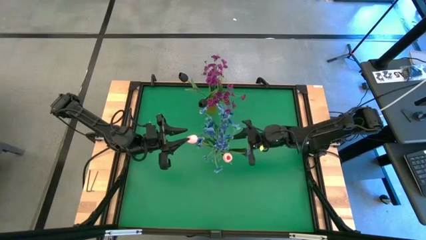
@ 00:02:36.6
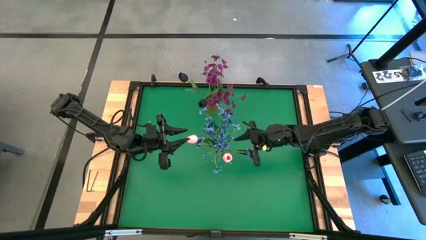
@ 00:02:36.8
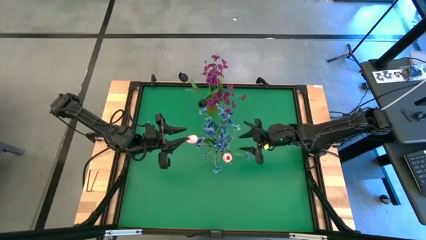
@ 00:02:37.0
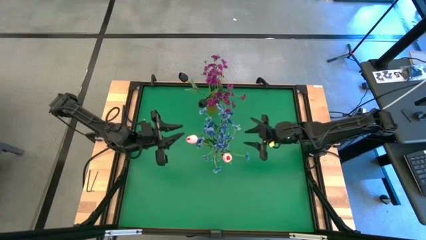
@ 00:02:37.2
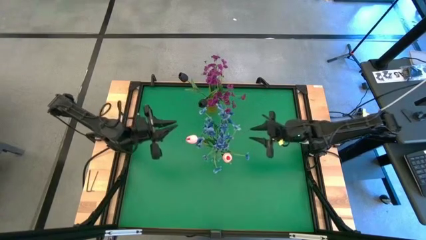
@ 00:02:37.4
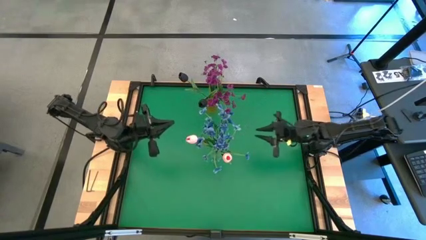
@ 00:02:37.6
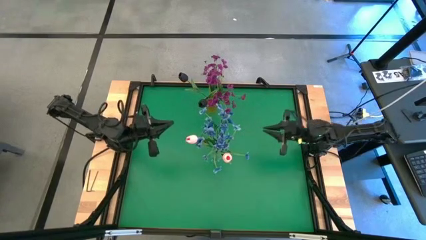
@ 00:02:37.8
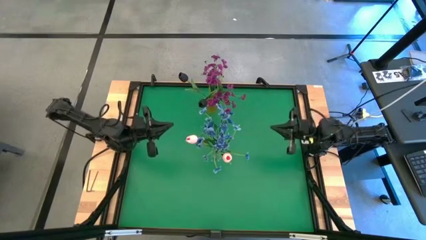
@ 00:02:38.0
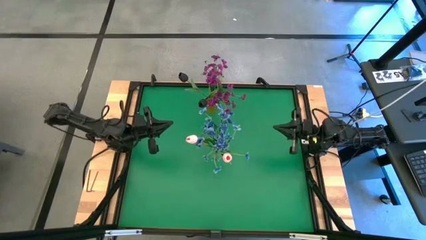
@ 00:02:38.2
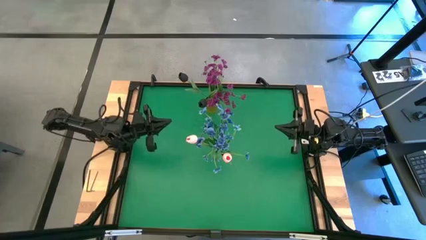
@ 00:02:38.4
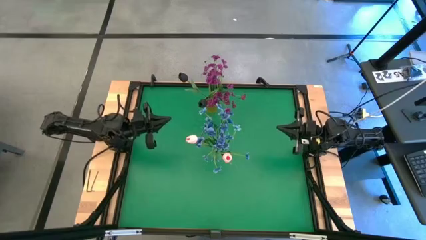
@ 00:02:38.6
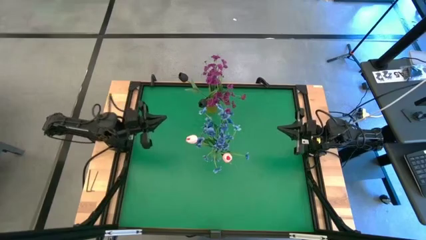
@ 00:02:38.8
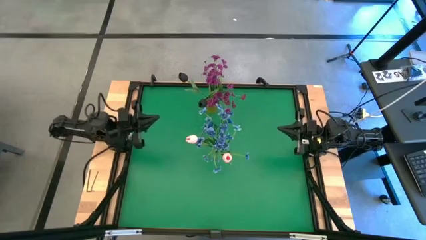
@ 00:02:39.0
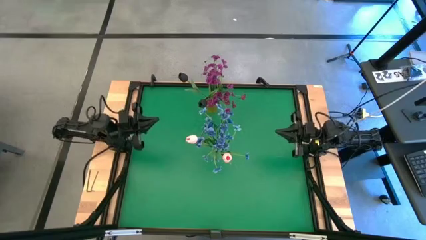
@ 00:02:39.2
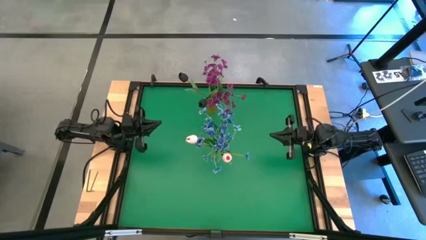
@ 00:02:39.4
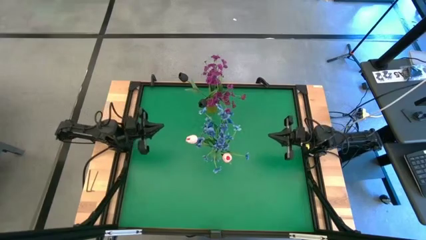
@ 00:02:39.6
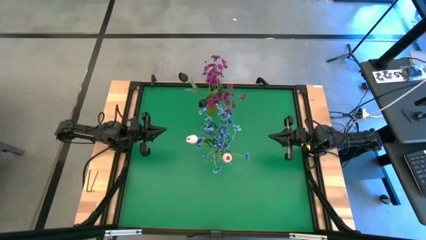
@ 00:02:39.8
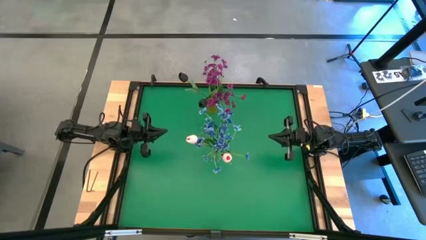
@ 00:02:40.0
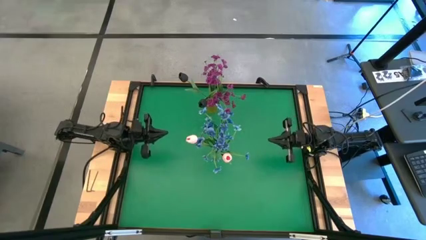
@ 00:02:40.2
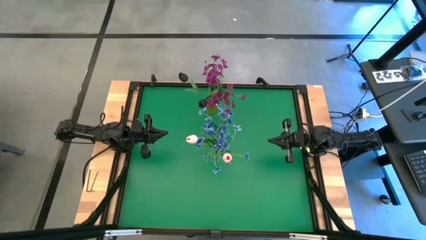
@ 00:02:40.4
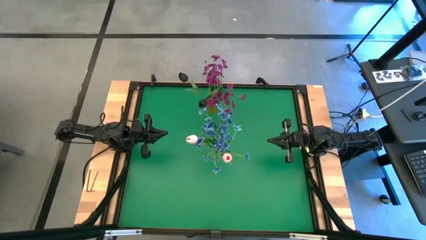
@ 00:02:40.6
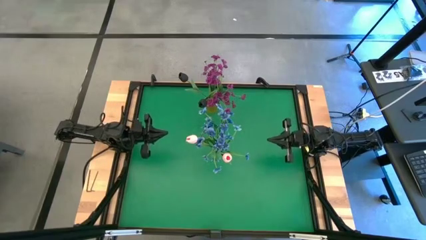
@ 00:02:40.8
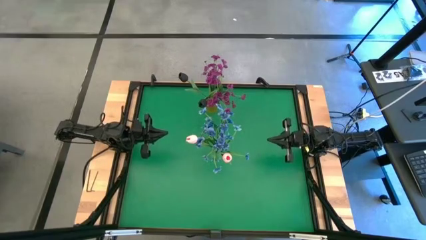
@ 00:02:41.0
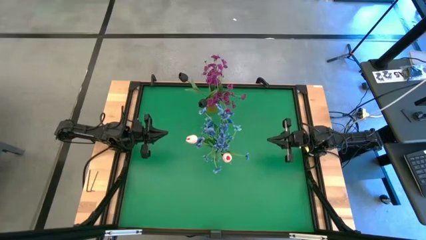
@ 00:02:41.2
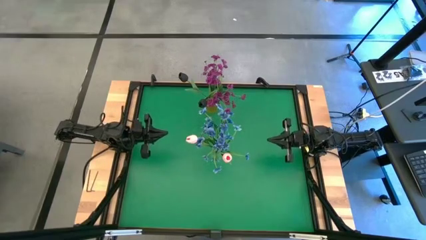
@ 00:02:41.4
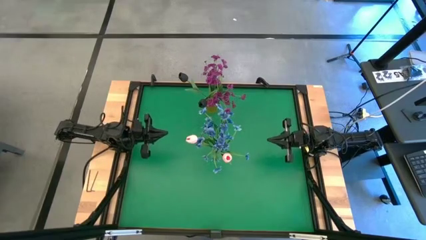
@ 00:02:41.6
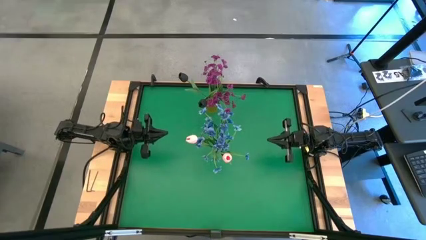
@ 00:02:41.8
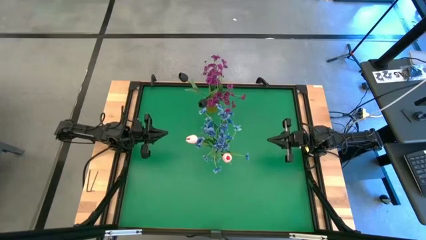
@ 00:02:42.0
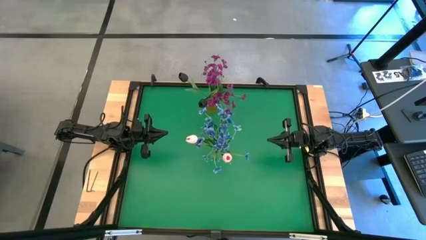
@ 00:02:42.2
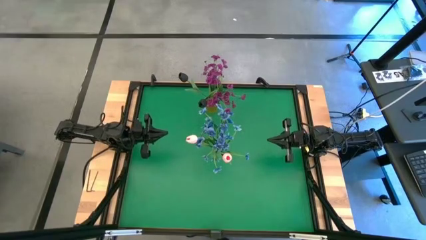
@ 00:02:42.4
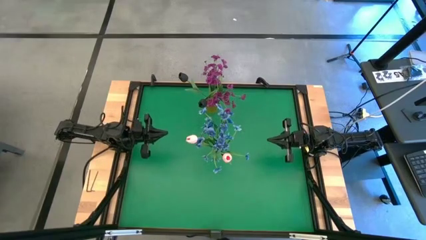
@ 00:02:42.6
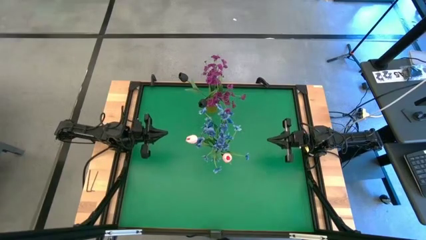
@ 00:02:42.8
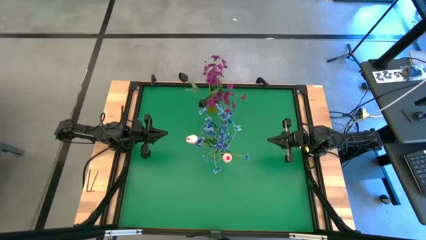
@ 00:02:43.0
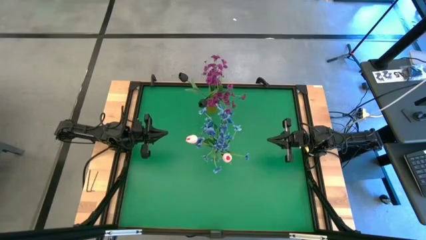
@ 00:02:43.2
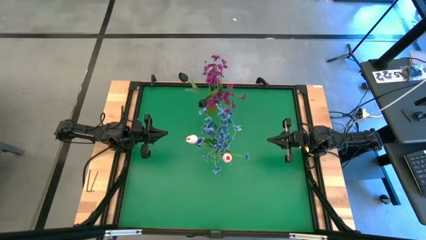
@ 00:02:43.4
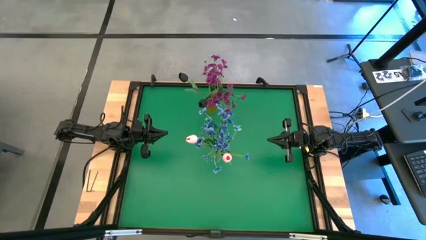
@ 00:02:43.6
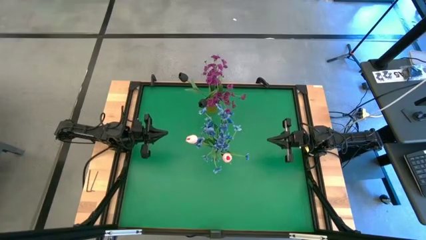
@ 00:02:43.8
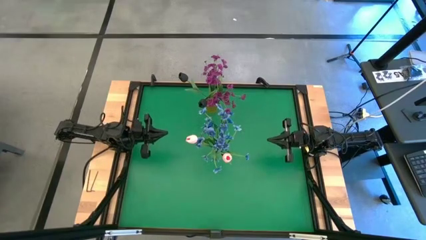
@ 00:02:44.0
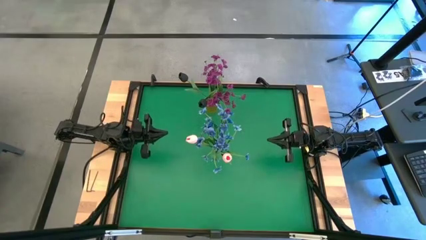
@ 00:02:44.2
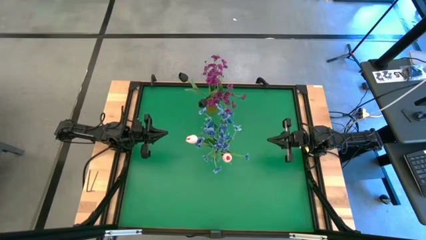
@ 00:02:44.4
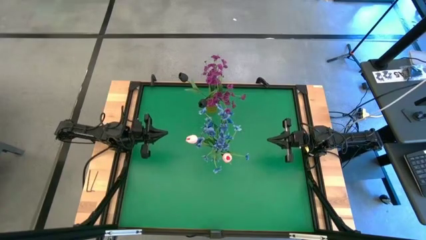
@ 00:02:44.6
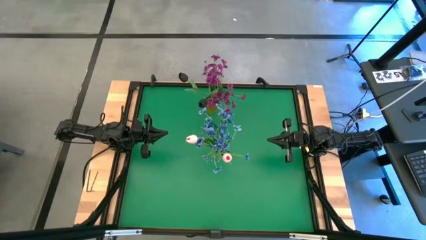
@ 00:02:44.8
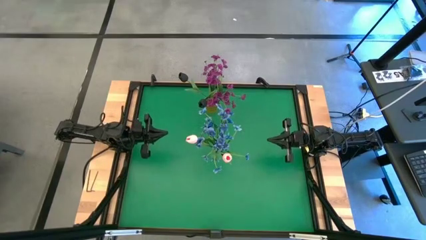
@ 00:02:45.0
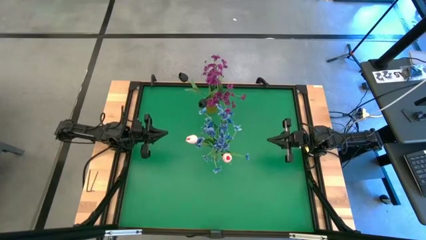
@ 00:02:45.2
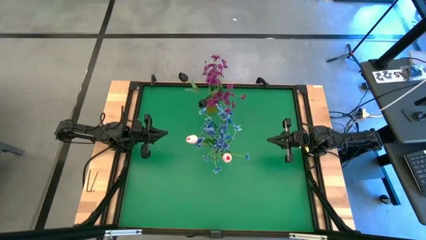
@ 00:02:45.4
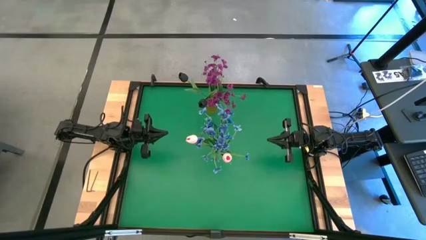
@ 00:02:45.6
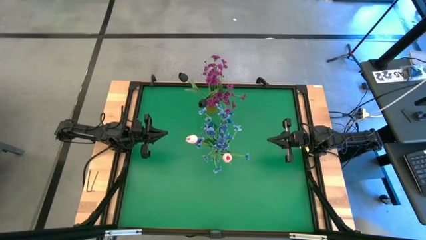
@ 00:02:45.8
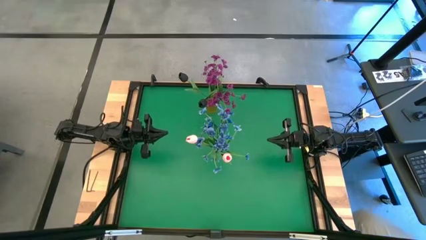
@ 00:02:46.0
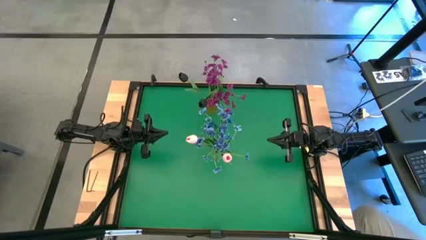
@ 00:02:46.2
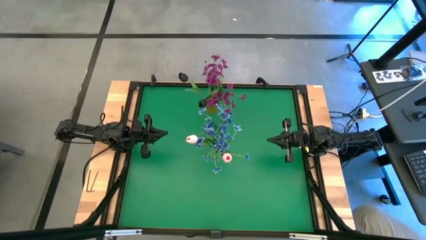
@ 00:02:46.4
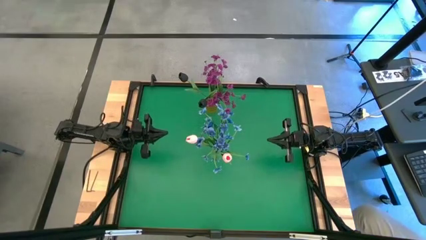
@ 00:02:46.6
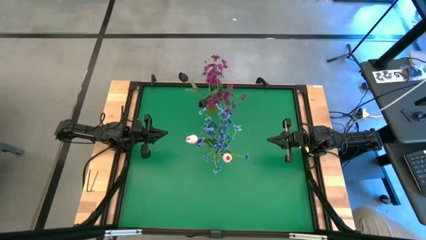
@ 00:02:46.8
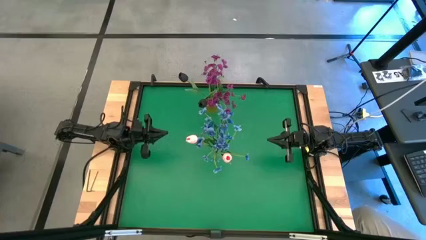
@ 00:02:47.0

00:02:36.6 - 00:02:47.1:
Task: Sort flowers into vase by color
Return to Home Position

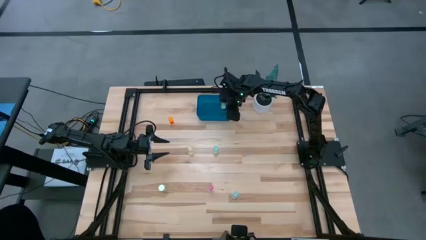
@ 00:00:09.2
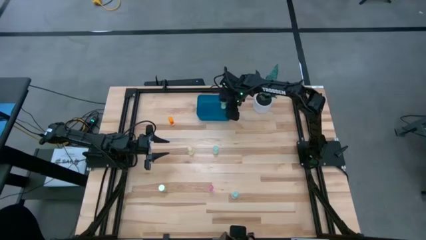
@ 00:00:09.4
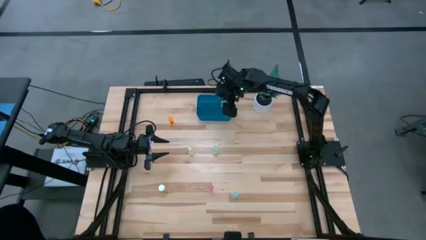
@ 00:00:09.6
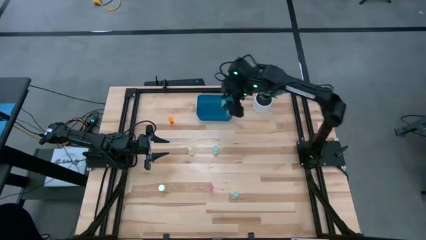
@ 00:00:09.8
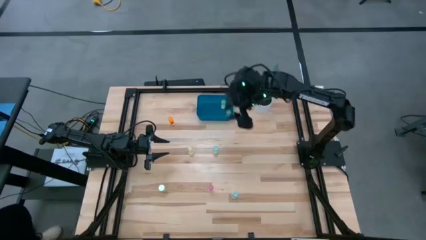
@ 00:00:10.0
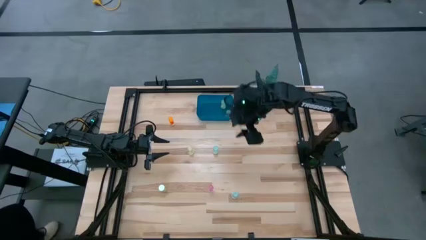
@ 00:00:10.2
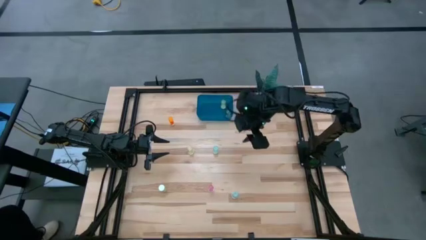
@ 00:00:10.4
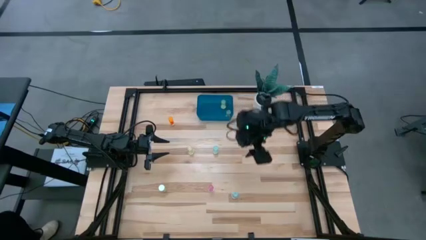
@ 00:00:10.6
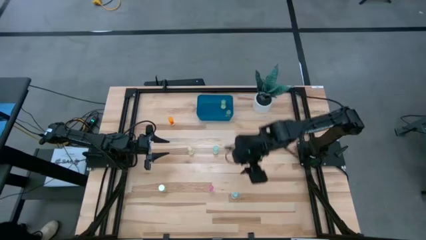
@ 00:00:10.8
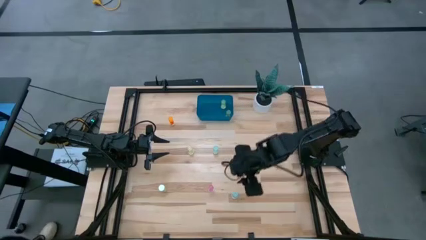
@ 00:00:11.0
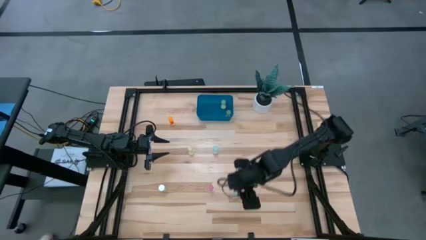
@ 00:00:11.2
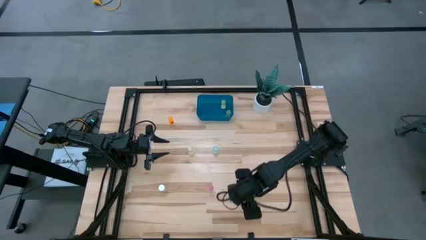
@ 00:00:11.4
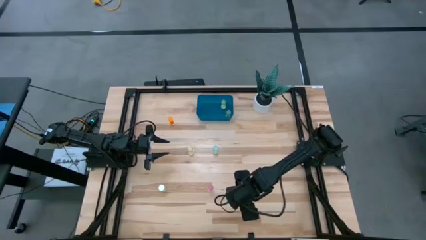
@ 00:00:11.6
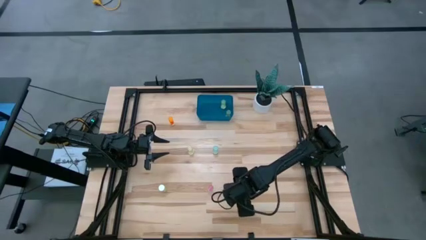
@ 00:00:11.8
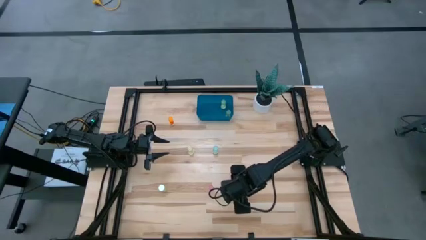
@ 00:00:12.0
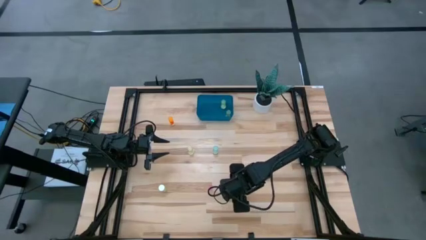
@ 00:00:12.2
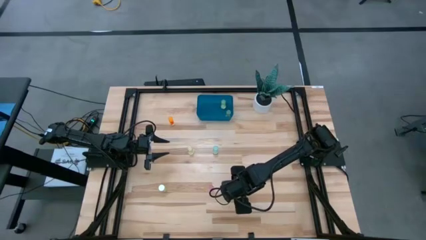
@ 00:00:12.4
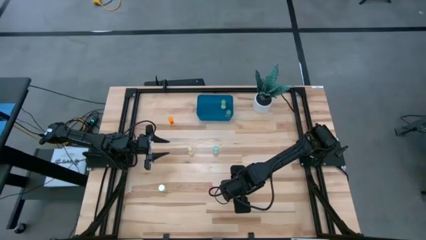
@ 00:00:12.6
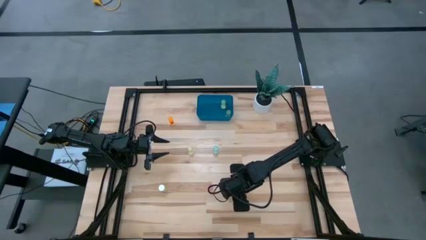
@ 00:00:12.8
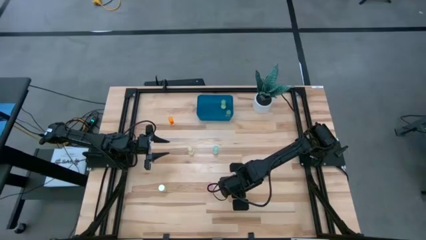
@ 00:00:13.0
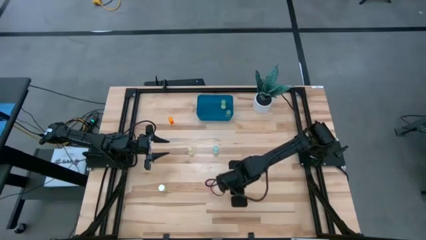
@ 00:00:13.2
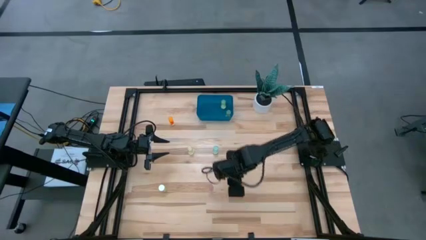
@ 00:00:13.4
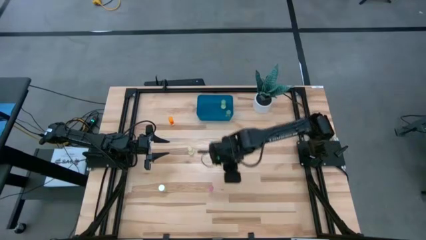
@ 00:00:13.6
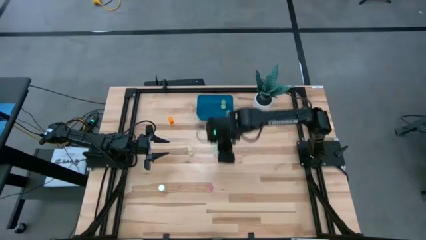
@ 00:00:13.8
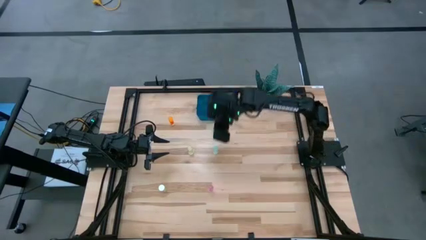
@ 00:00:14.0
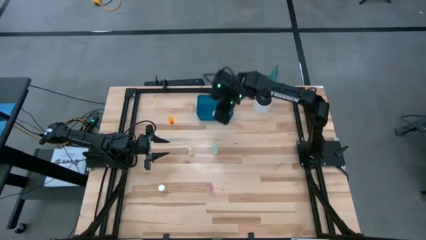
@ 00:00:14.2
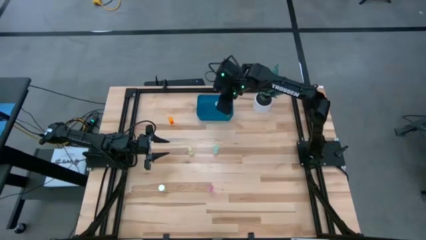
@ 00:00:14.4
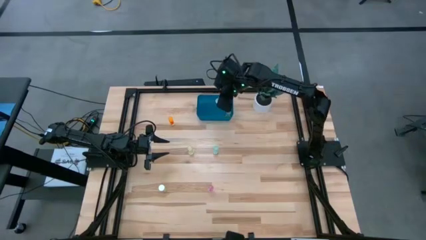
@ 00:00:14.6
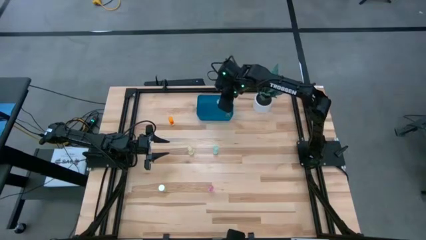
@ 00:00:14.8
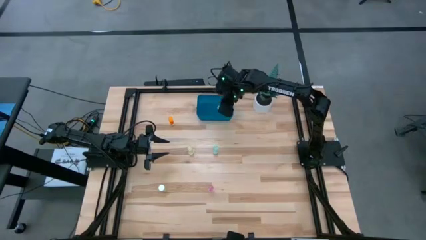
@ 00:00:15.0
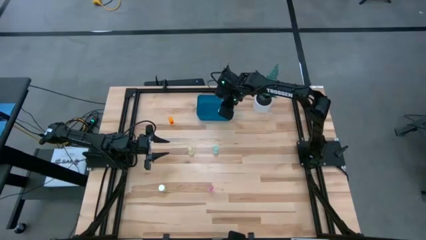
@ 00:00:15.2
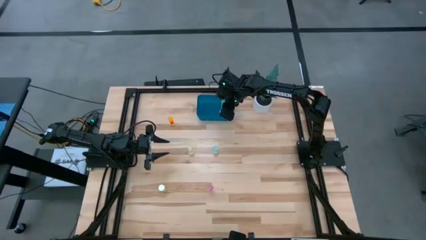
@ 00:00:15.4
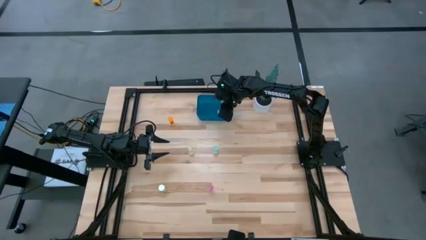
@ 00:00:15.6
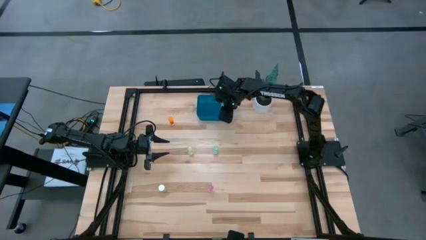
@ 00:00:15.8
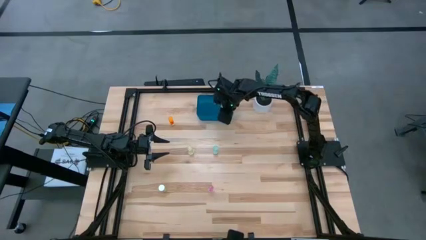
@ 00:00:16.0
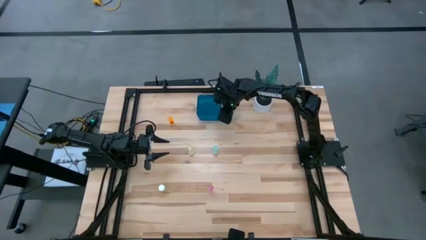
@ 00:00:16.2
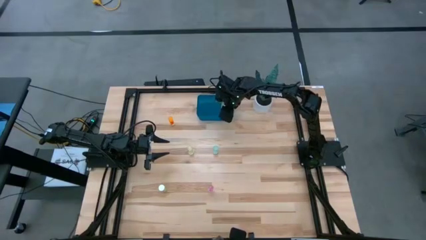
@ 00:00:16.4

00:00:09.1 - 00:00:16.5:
Task: Pick and place pill bottles into a basket
Put the blue pill bottle into the blue bin
